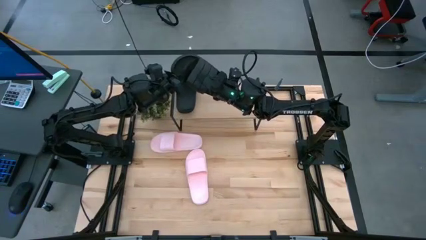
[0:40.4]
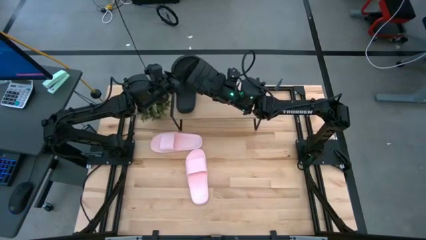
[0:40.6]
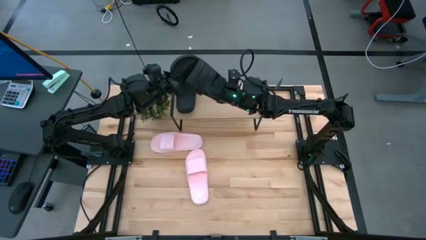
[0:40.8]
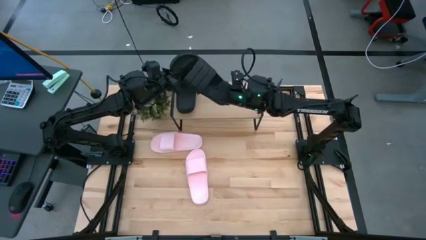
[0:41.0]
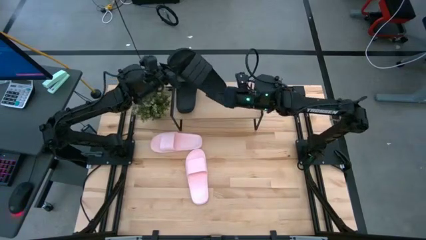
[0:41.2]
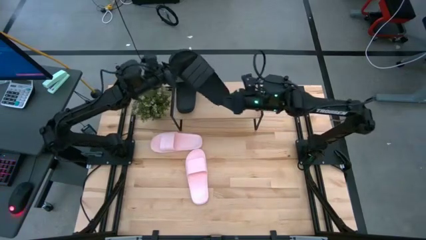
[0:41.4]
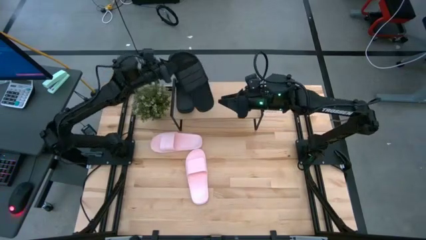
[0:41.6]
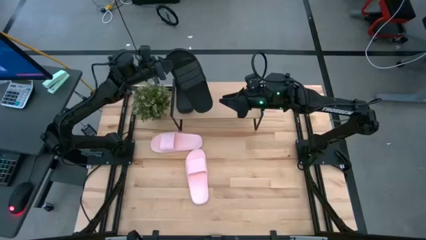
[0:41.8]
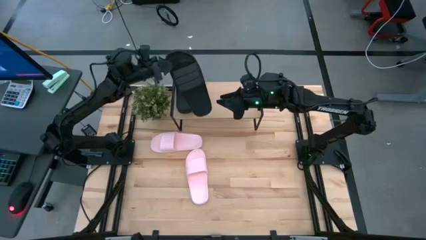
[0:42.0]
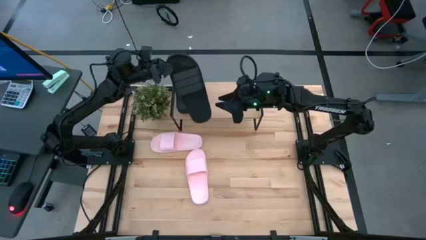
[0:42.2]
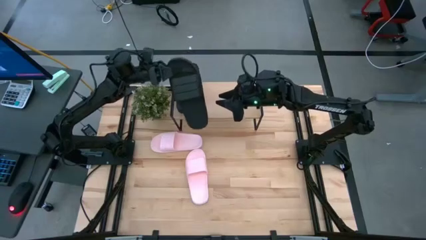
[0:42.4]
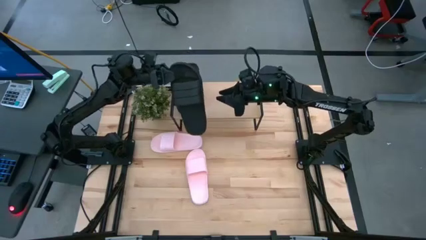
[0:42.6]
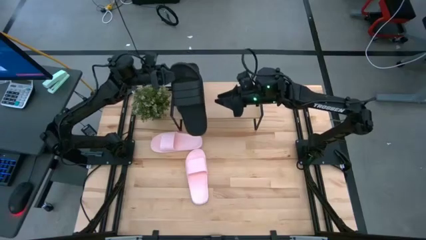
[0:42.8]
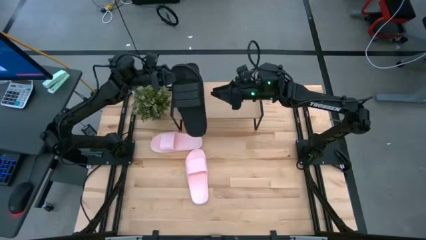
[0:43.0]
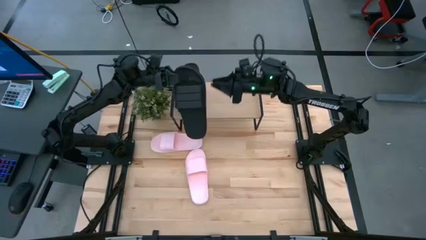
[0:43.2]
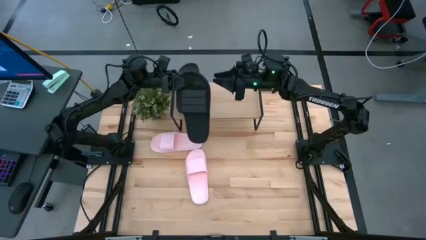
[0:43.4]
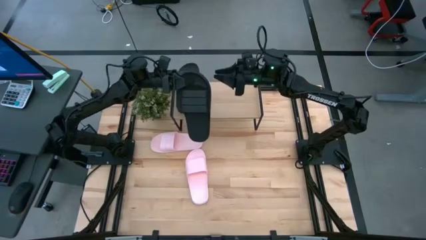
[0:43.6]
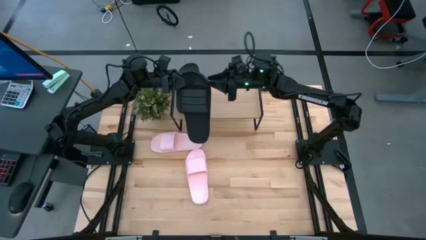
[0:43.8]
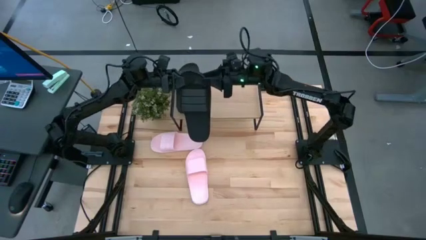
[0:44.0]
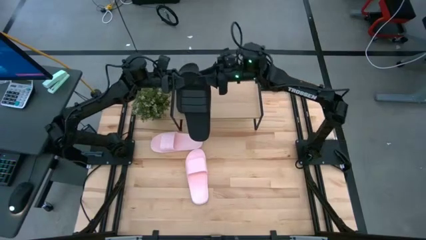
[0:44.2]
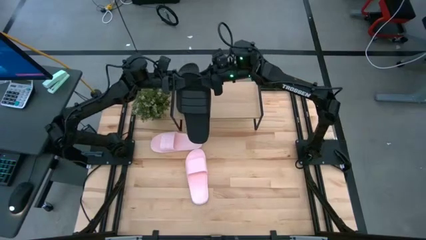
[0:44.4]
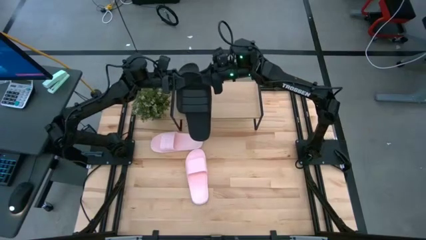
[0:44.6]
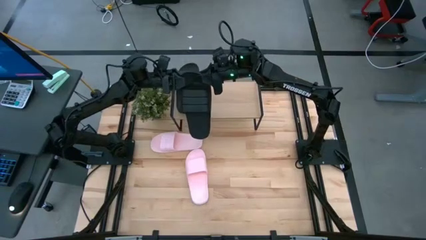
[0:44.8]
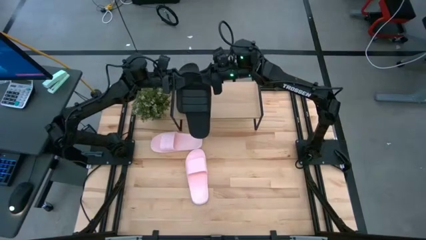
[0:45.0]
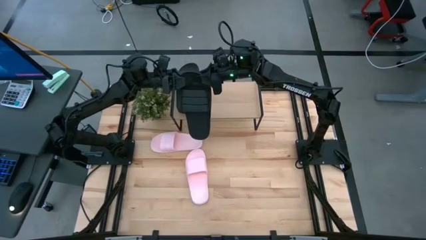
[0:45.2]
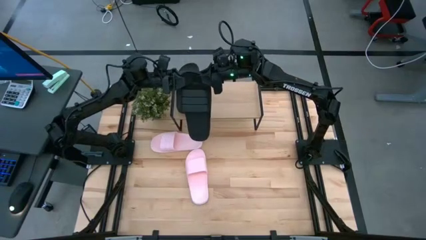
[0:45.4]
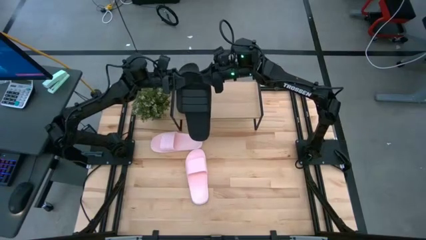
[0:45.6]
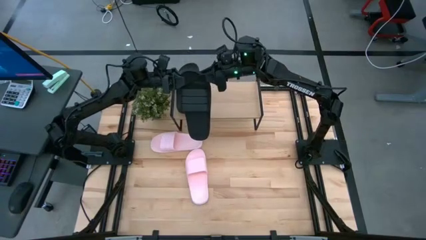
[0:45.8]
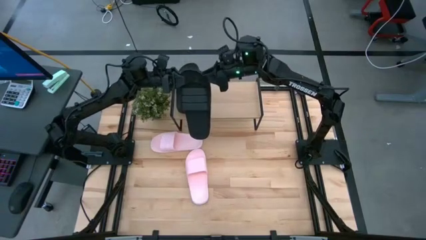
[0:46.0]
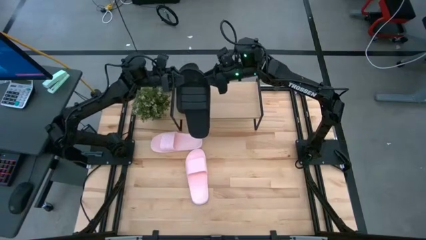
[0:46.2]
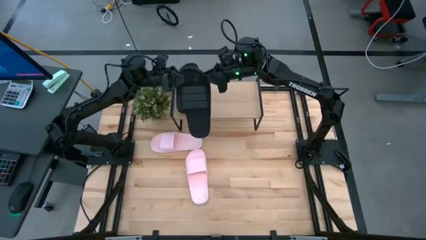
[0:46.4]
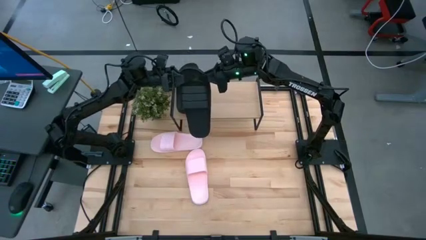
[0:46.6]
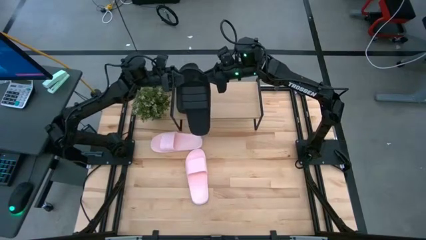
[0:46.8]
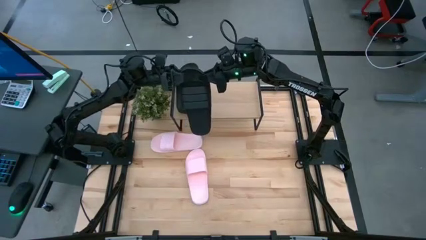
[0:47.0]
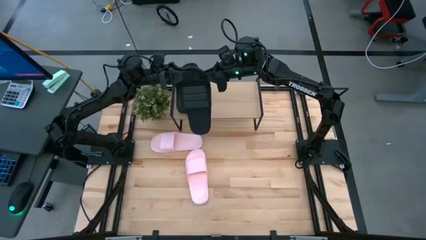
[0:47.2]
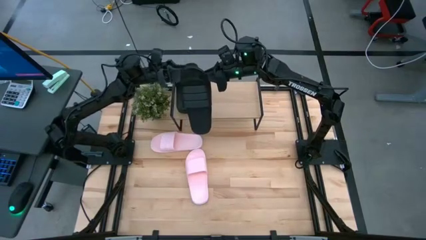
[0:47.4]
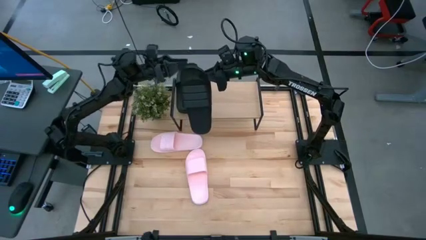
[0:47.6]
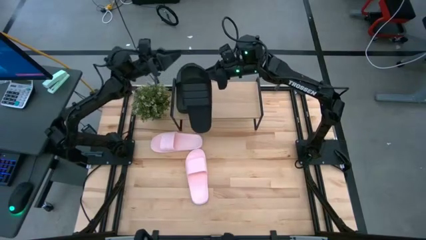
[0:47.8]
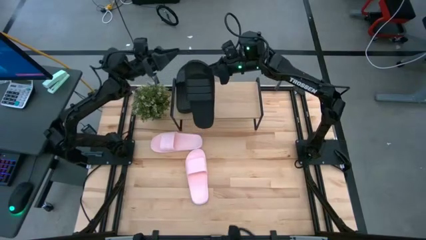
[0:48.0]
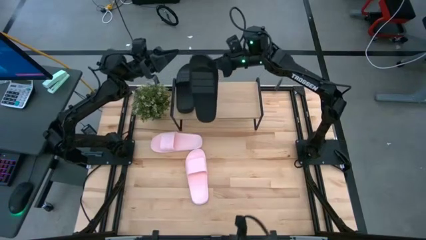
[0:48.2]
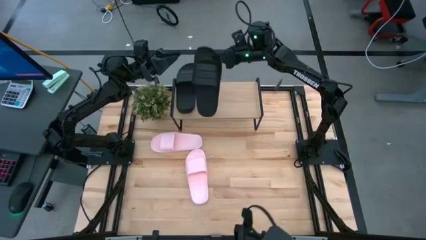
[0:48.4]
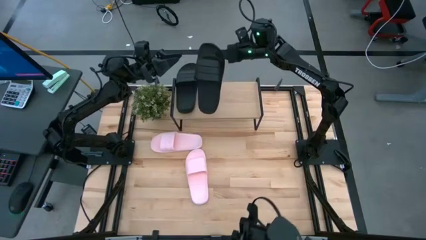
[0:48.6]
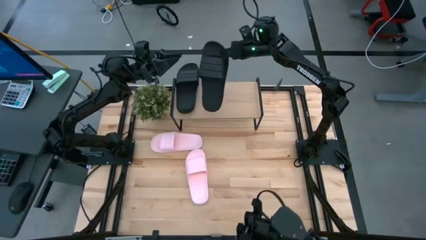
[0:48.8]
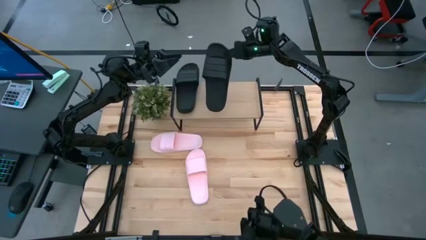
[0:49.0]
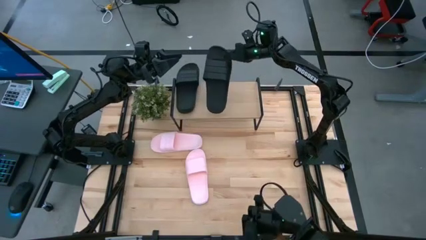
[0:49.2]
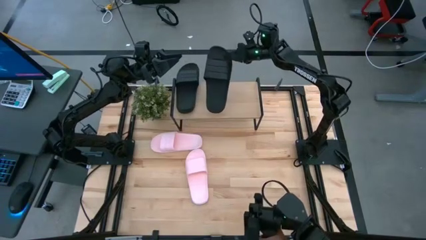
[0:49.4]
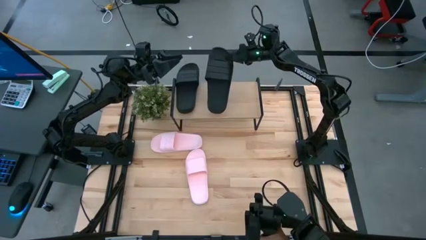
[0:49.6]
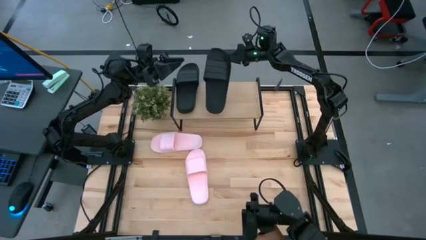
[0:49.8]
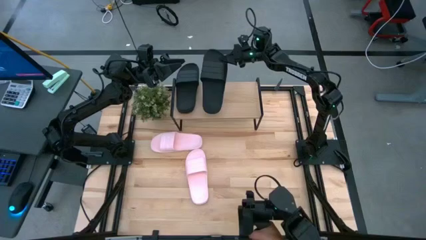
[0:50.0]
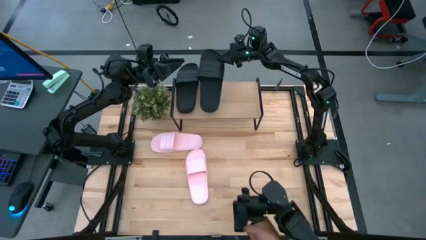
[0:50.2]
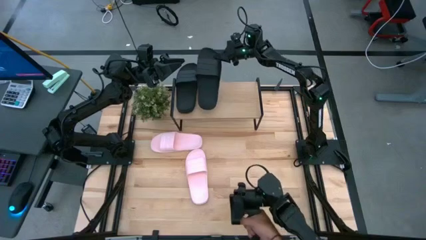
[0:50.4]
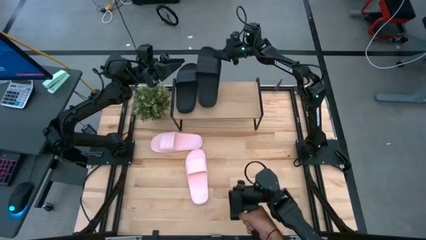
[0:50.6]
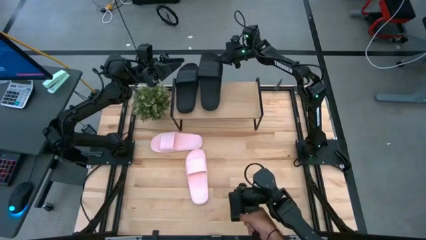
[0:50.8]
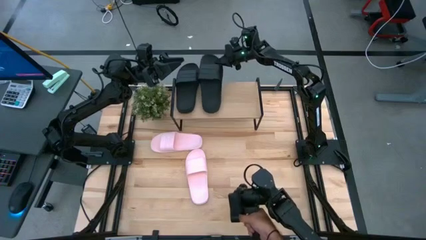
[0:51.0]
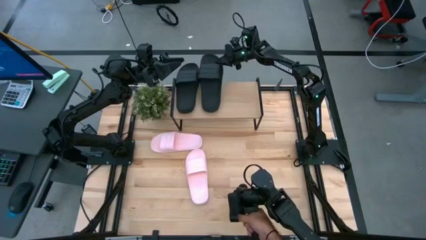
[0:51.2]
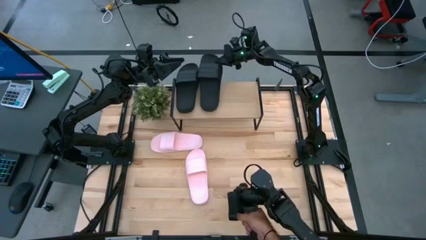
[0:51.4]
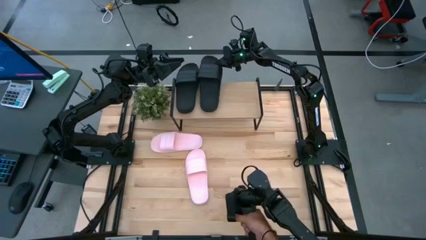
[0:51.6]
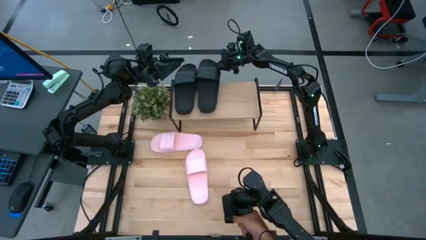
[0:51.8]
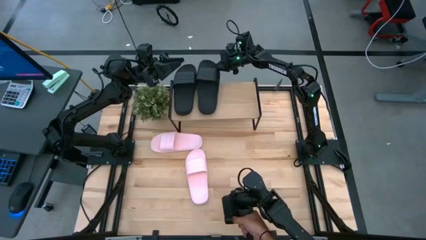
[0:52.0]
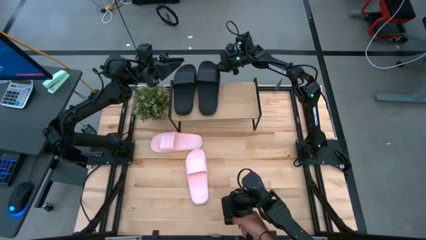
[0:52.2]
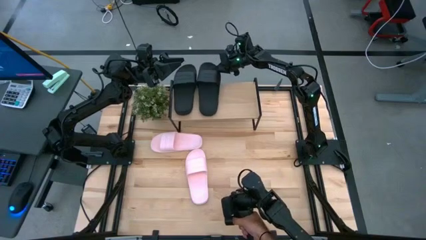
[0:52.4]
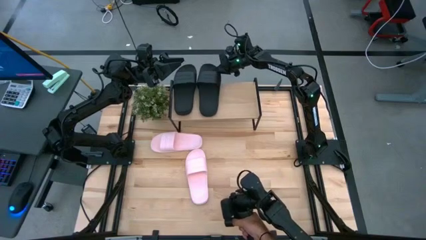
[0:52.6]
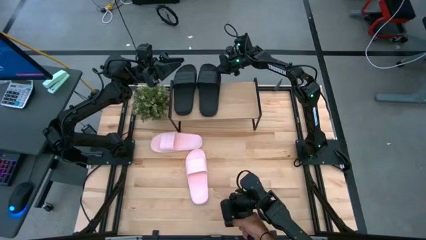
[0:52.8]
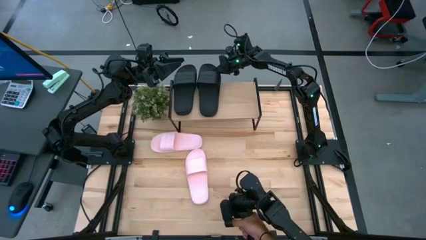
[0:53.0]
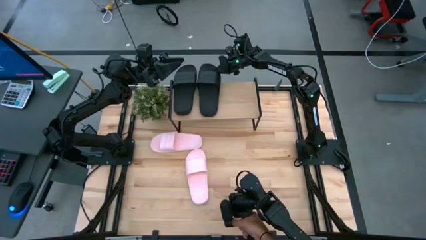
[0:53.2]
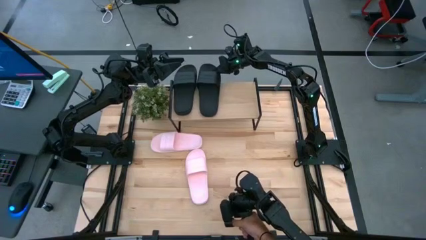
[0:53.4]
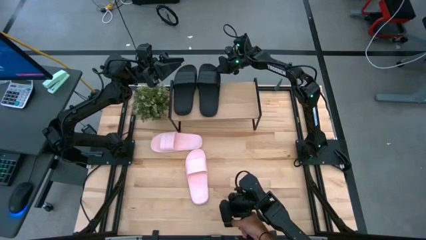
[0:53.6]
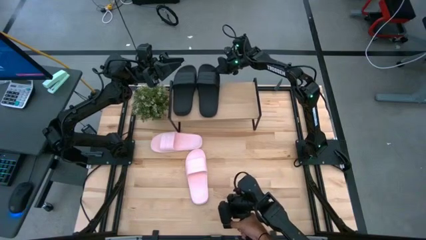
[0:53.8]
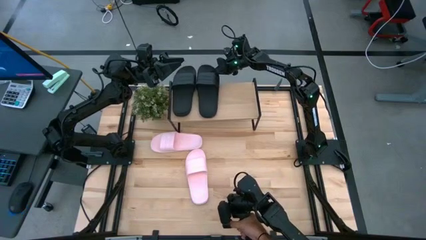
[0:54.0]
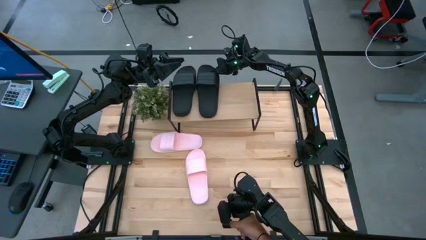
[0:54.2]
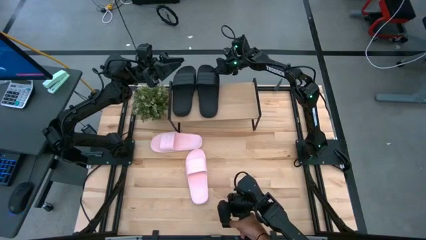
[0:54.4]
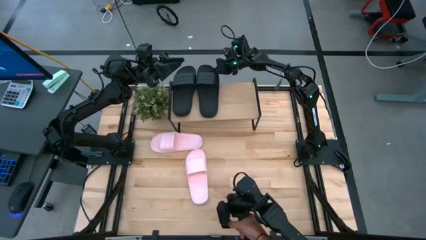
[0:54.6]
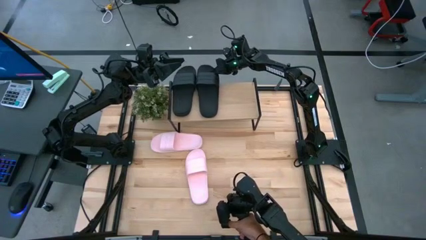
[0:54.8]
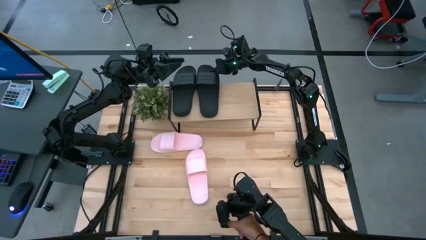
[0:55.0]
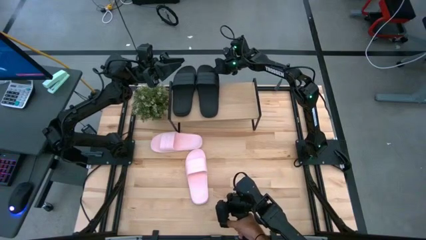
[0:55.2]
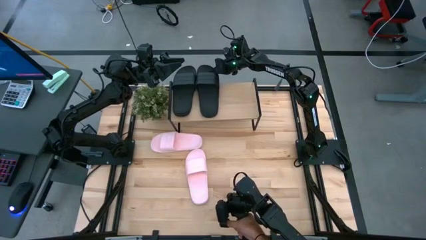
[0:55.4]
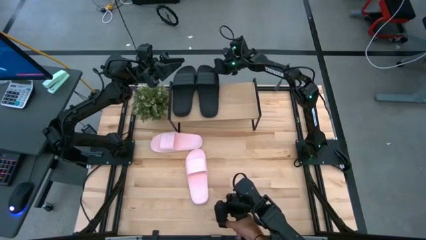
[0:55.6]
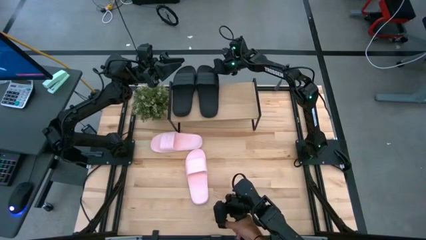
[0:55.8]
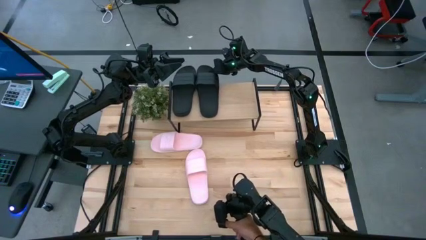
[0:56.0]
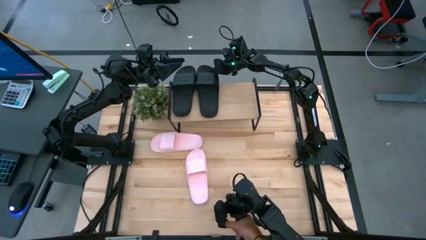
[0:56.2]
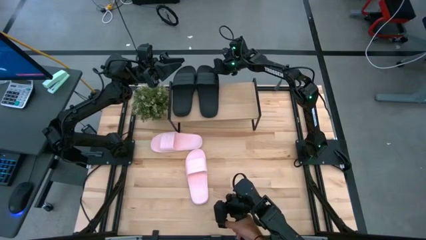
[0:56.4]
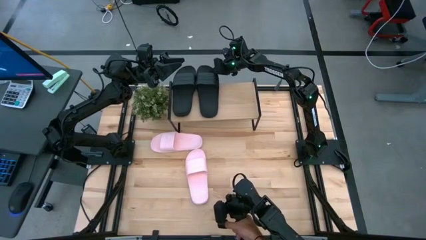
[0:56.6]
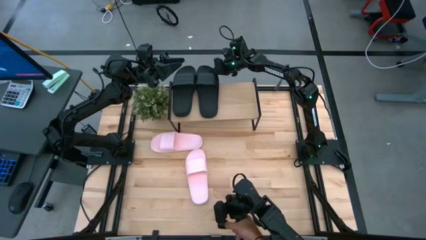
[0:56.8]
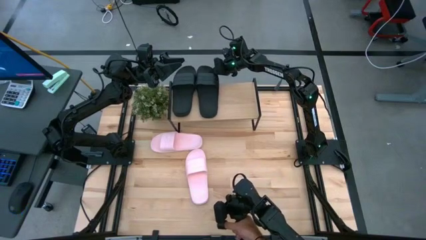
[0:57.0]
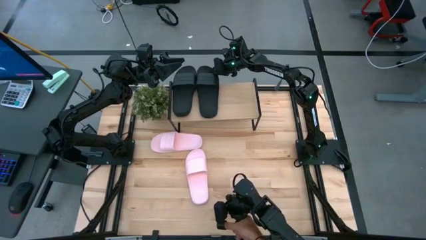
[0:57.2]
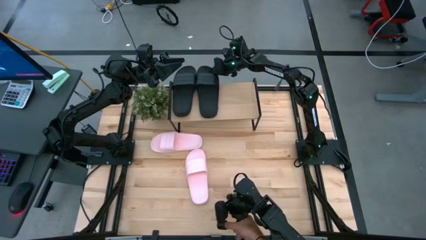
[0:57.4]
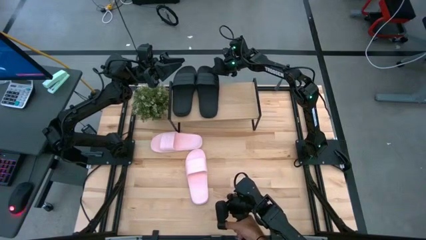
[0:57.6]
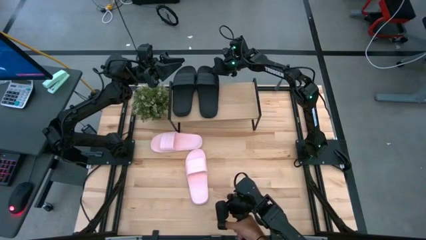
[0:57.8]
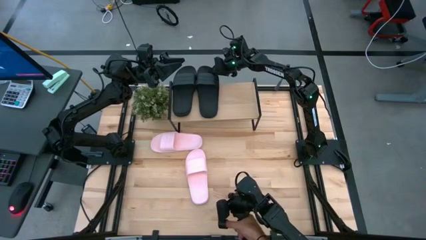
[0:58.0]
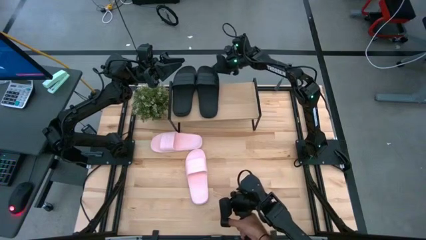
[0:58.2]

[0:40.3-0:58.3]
Task: Pick and place slides into the shelf
Put the black slide on the shelf
